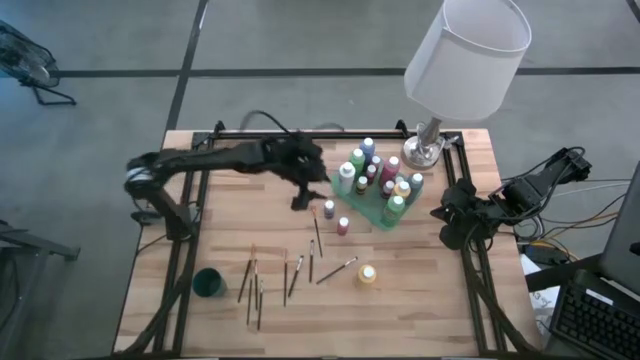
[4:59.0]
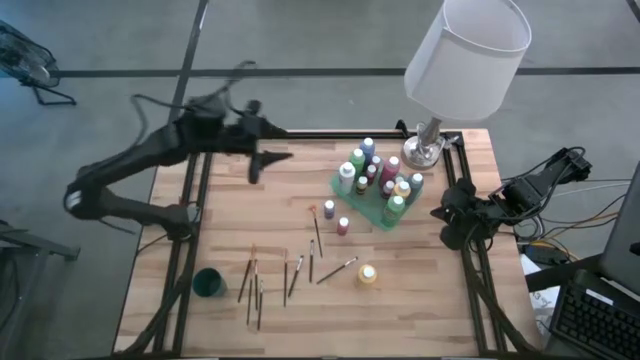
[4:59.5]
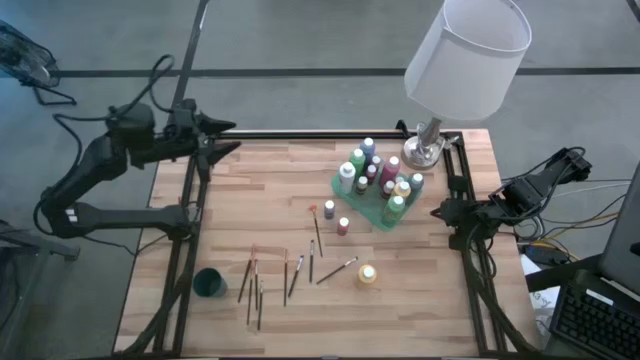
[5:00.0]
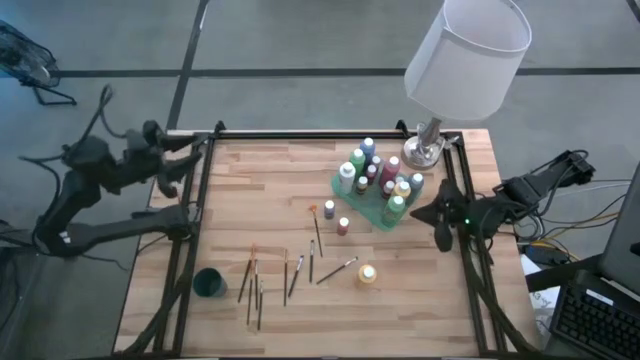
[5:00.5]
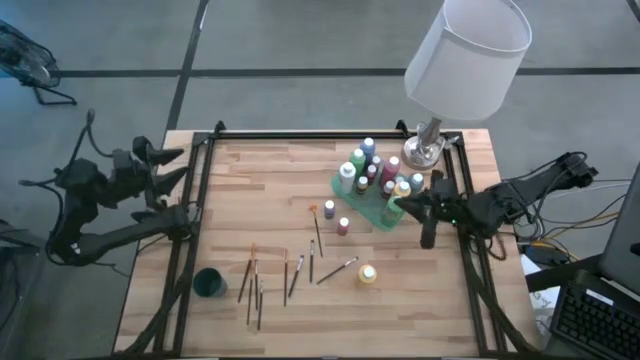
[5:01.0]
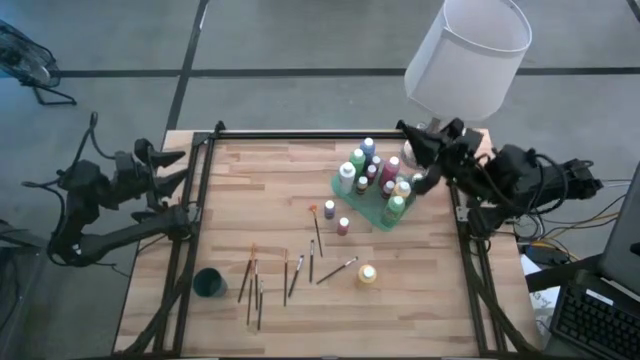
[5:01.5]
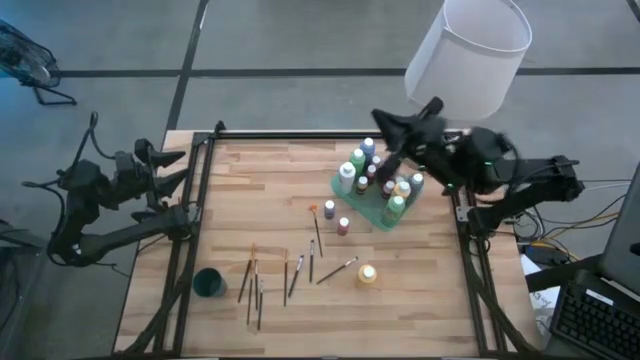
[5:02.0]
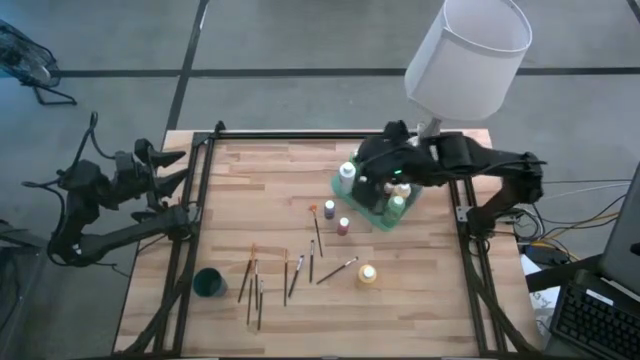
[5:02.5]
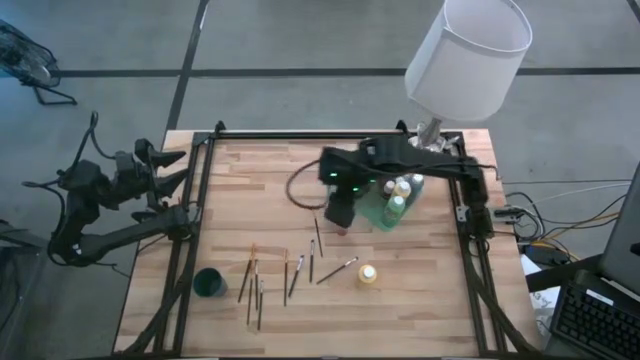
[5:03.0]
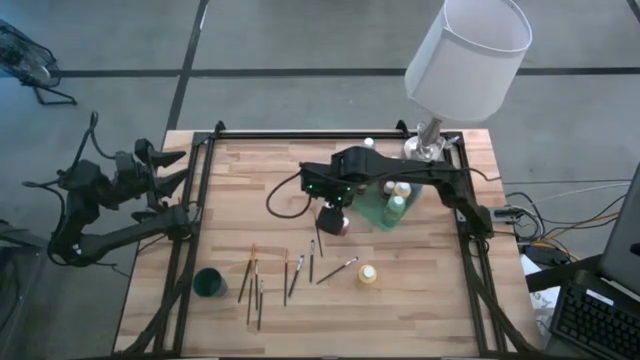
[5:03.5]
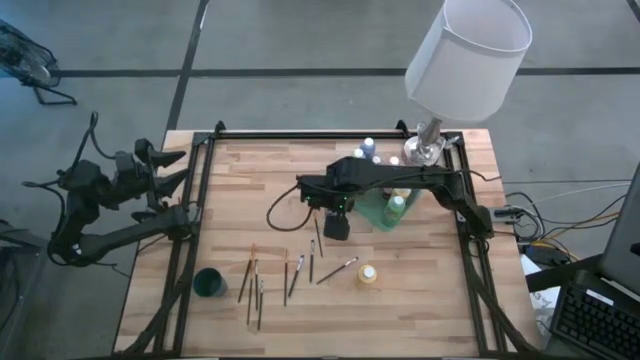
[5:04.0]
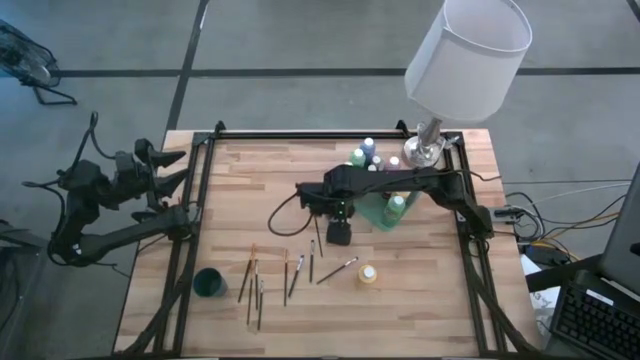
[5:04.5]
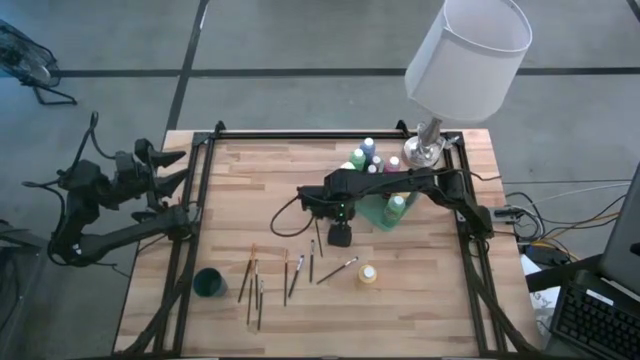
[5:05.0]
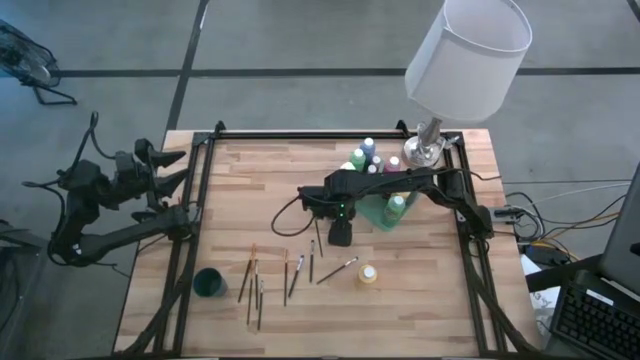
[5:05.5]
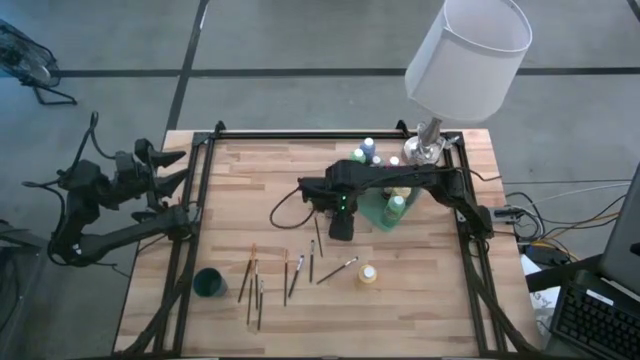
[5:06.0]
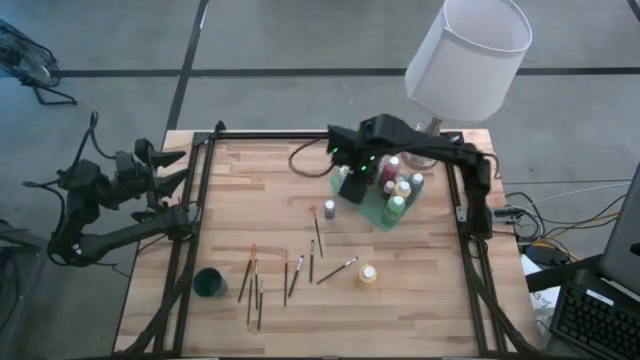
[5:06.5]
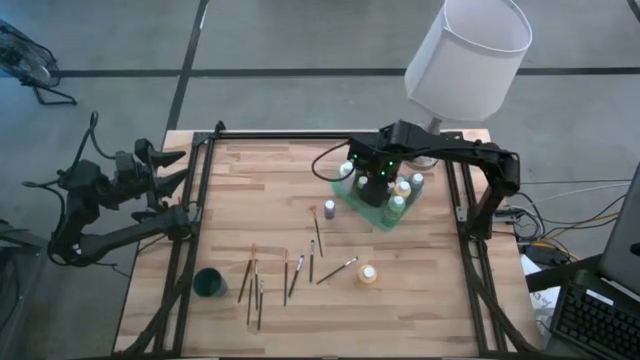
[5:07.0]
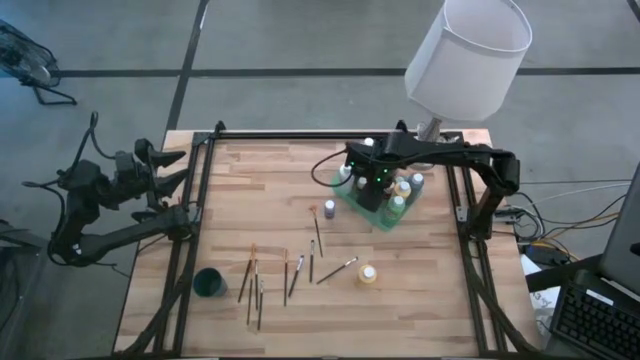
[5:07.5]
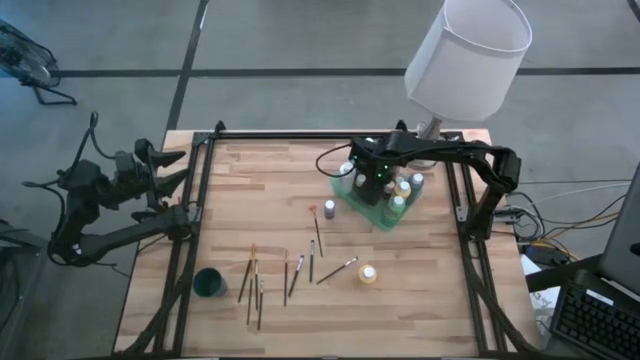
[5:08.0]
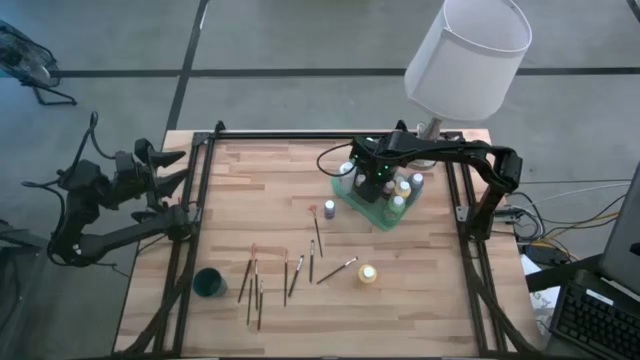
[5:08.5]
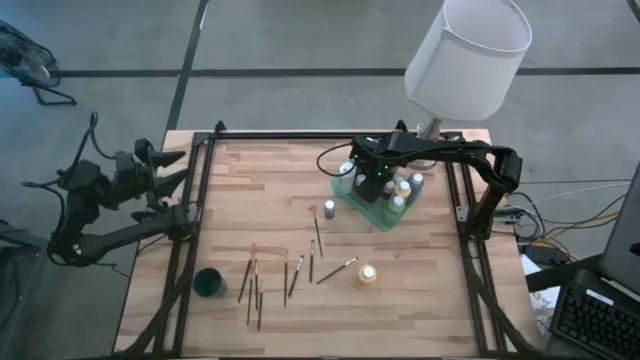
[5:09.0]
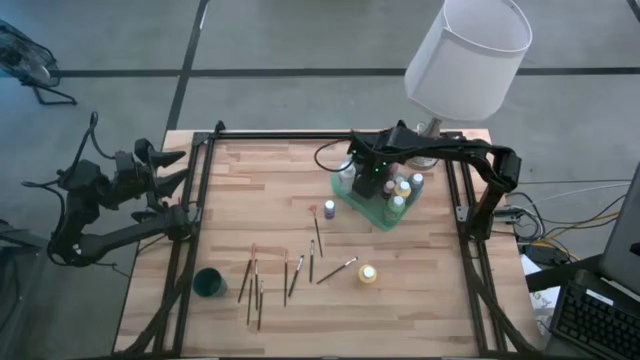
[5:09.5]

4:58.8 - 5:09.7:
Task: Pick & Place Paint Supplies
Put the small orange paint bottle into the green transparent bin

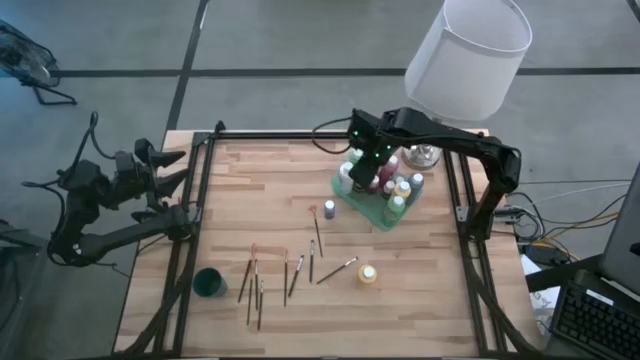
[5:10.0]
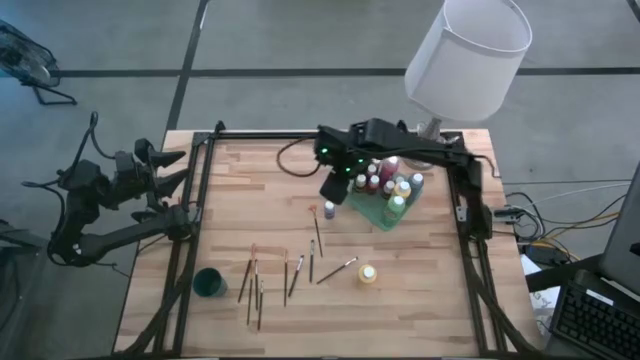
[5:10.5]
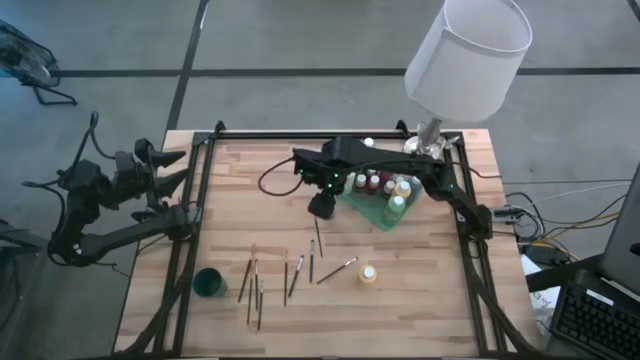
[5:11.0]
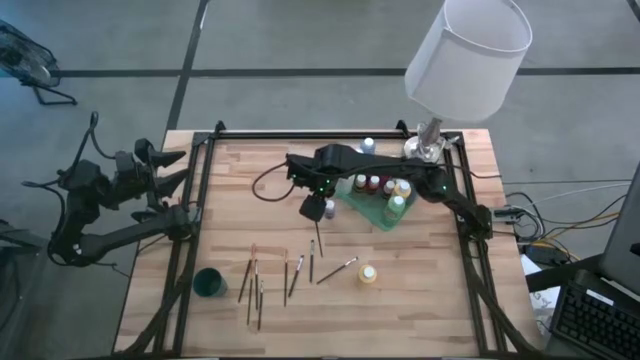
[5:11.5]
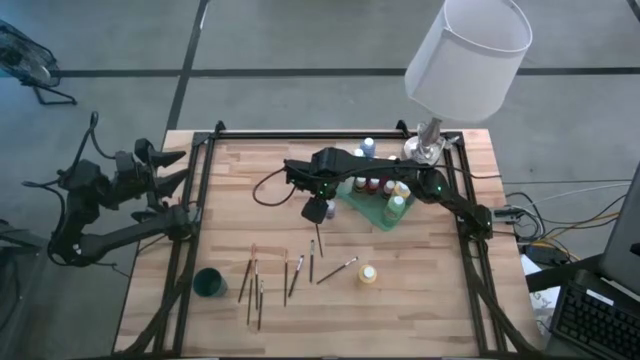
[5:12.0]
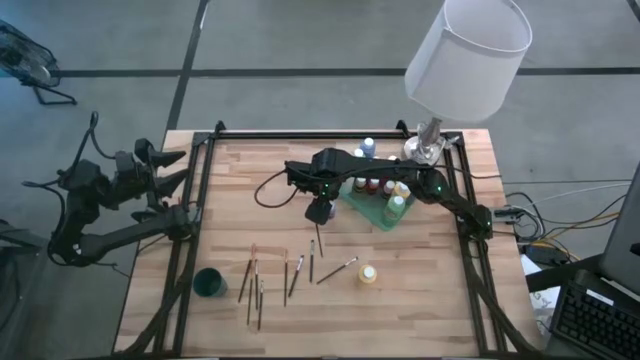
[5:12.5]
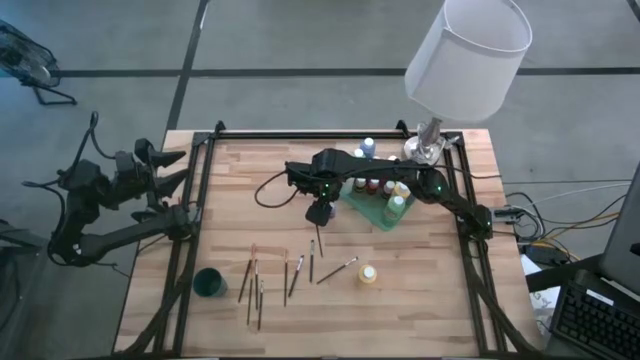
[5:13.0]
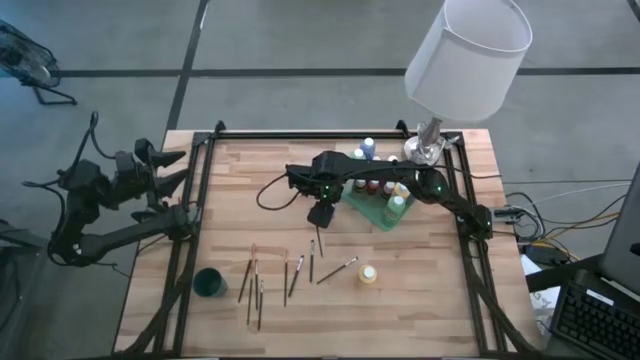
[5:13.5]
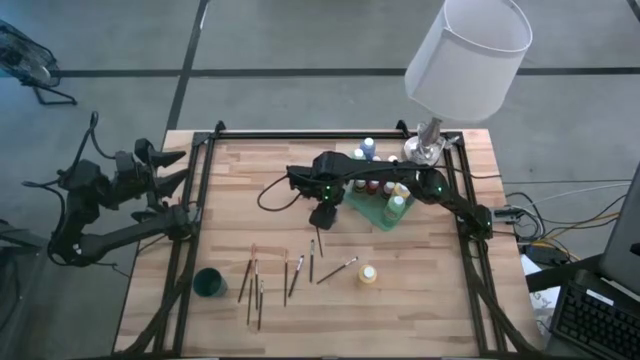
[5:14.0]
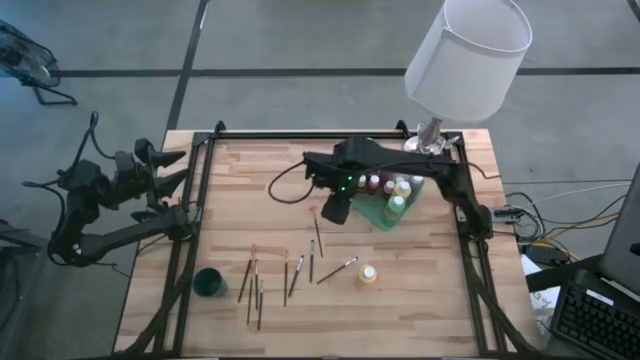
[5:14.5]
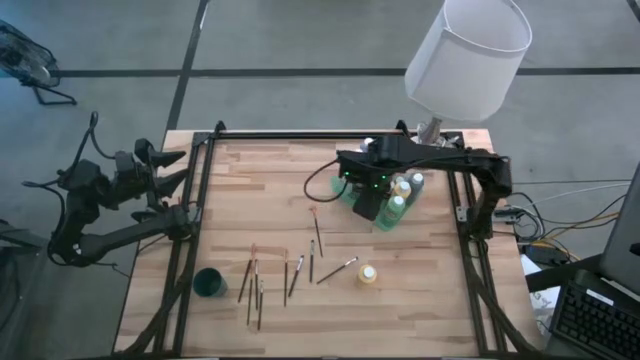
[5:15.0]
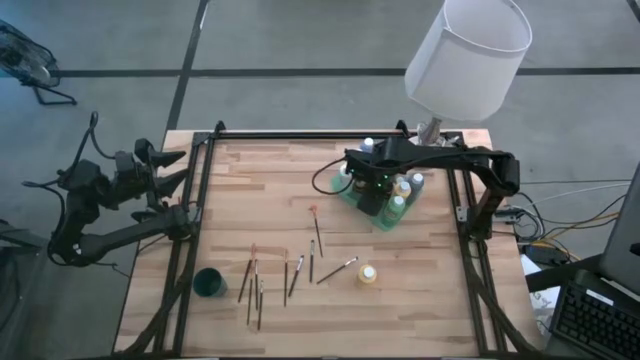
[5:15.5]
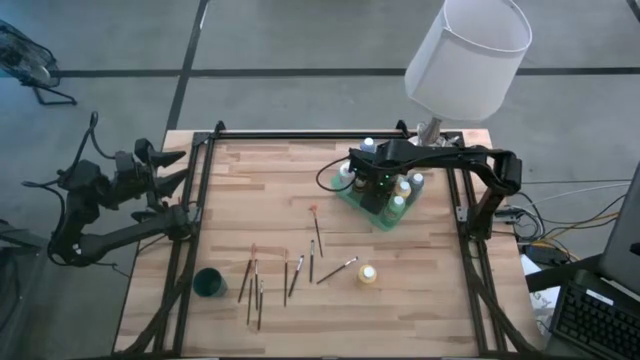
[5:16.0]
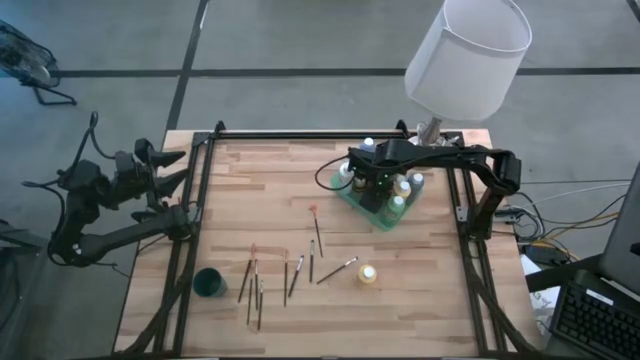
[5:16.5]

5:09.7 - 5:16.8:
Put the small blue paint bottle into the green transparent bin

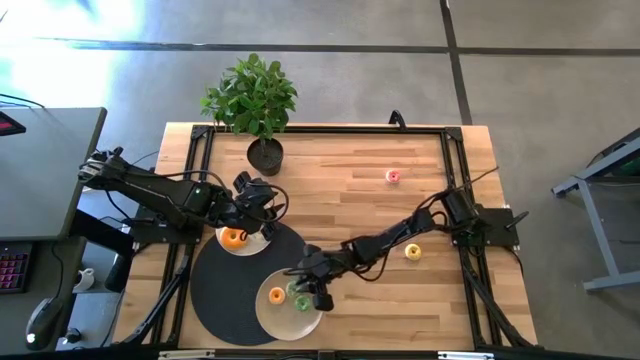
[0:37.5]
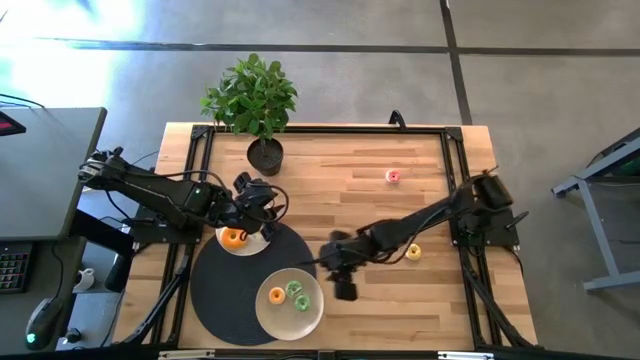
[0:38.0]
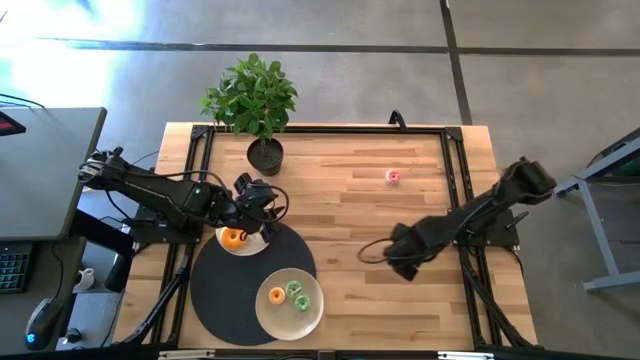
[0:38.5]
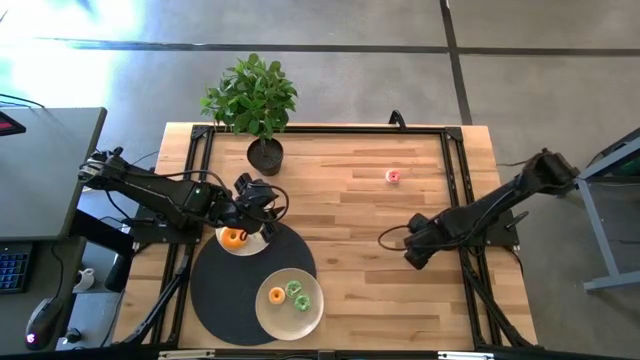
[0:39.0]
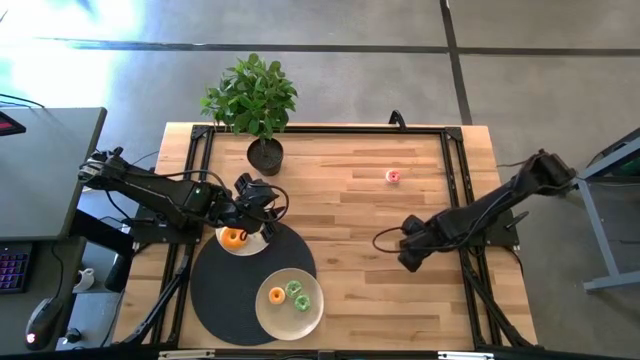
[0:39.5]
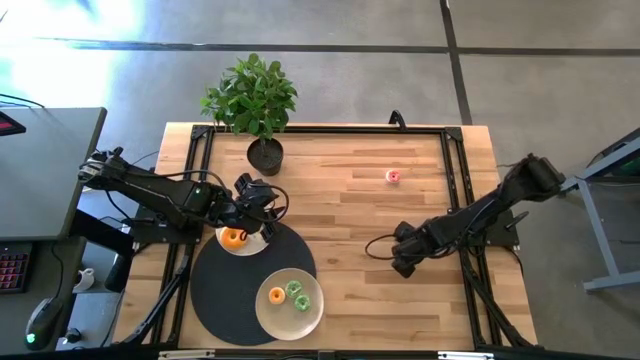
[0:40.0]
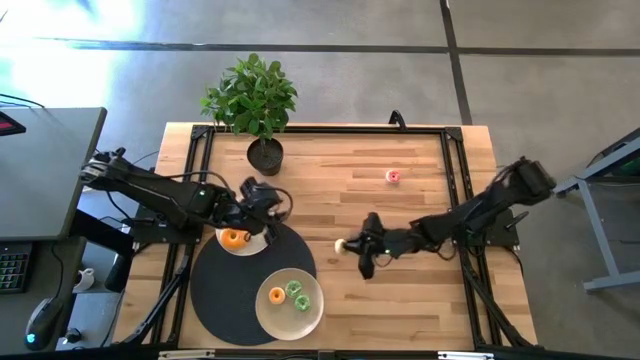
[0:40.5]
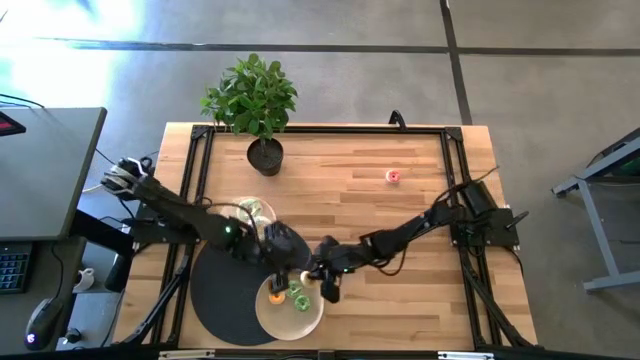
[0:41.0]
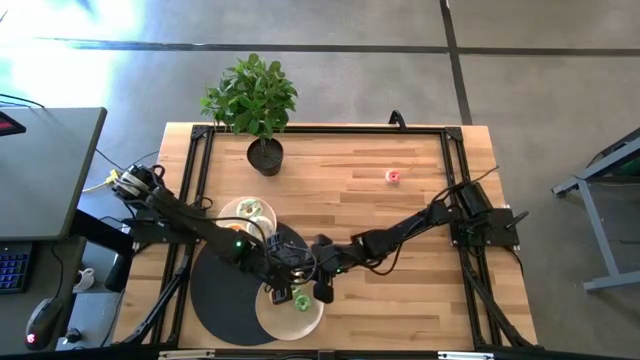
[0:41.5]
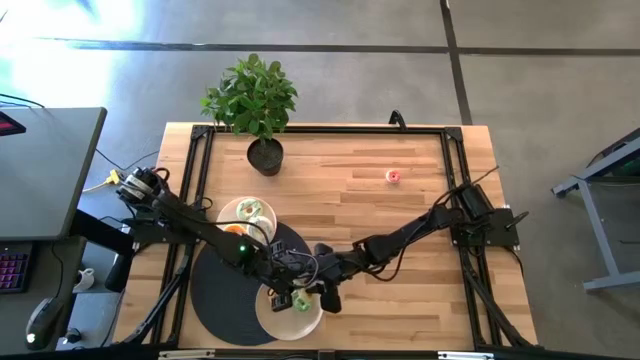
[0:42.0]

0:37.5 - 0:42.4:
Task: Pick & Place donuts
Put the small yellow donut on the light brown plate
